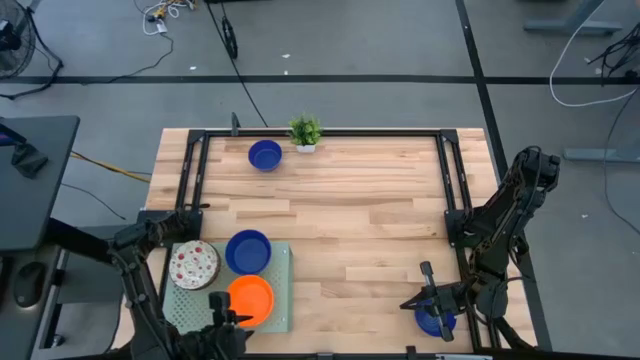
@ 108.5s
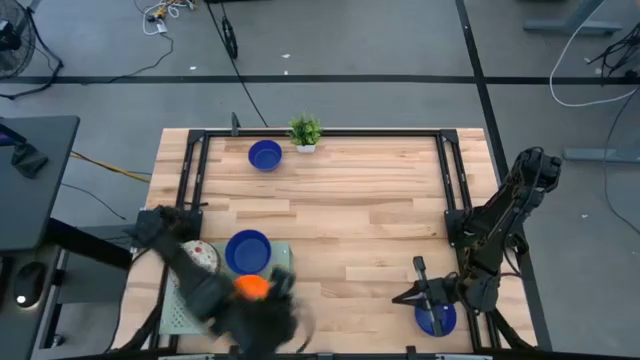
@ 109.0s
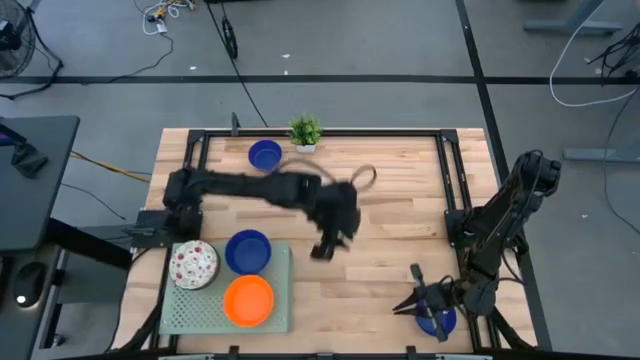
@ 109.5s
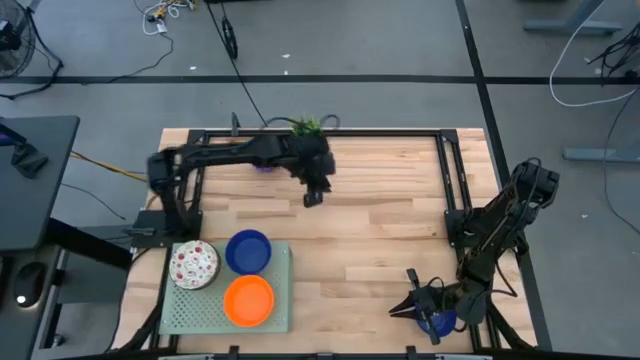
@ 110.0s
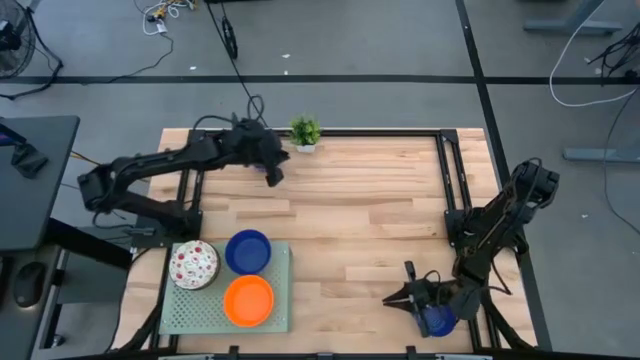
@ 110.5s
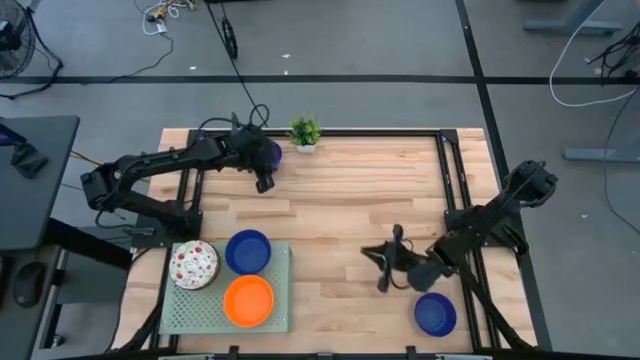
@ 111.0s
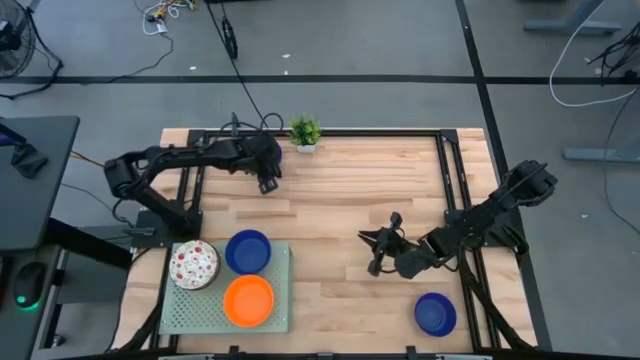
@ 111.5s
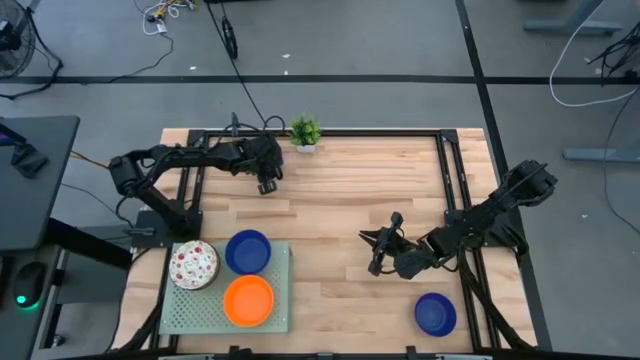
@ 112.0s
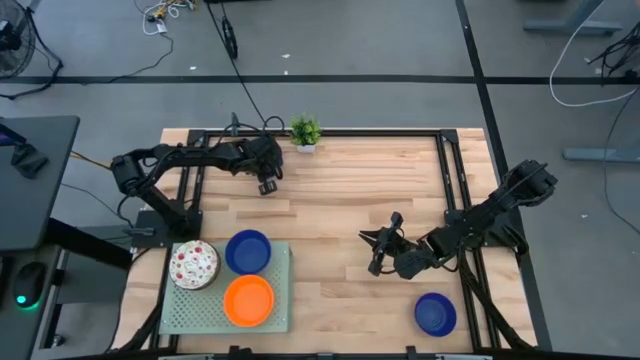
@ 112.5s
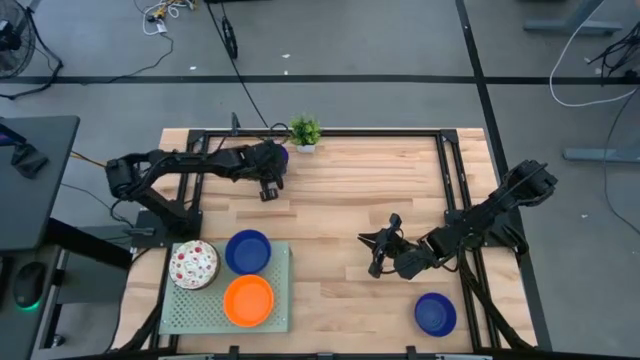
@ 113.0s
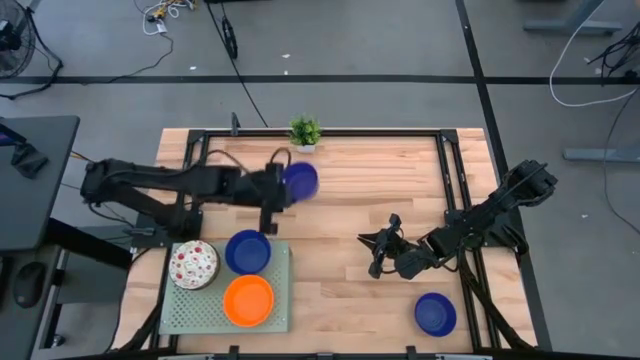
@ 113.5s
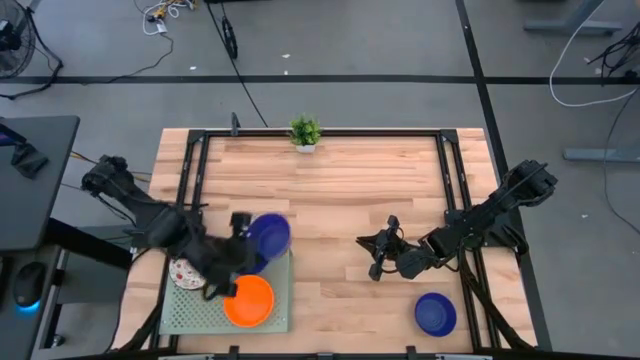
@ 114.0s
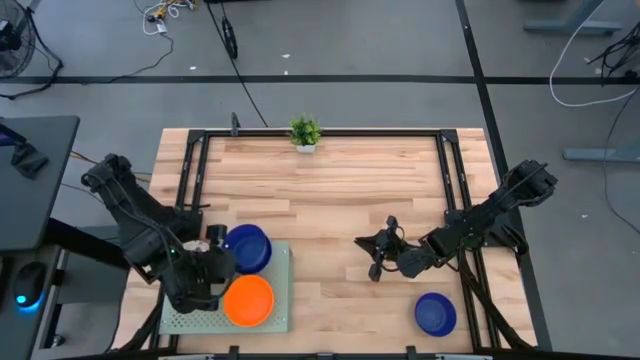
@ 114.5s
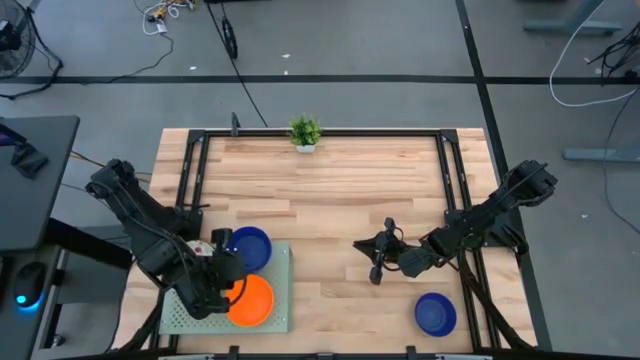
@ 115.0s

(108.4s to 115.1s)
Task: Pick & Place Mini bowls
Stack the blue bowl on top of the blue bowl on the shelf

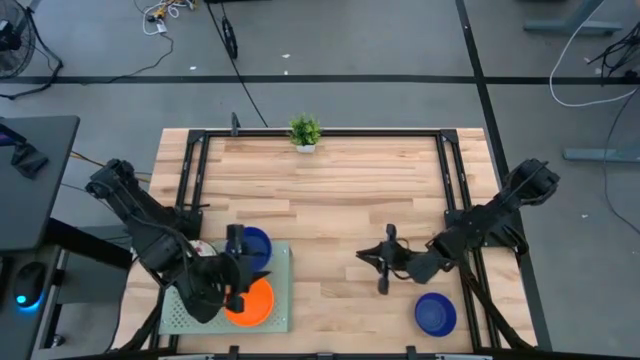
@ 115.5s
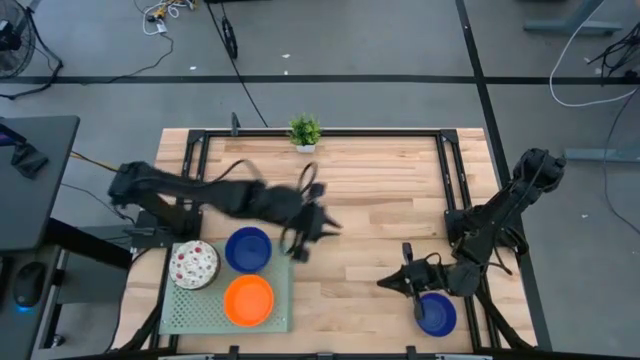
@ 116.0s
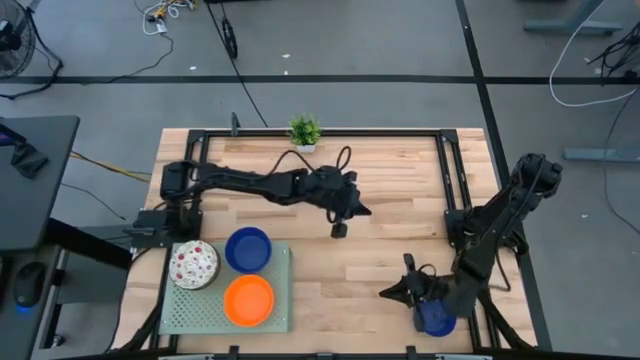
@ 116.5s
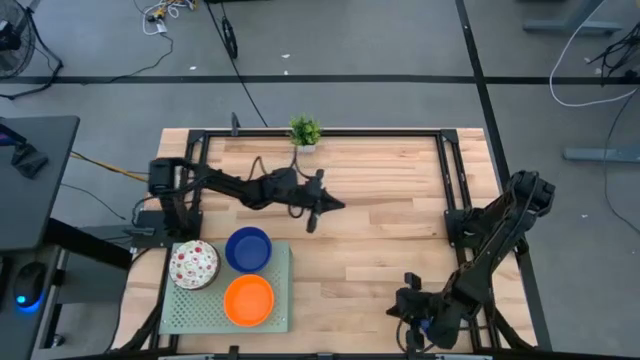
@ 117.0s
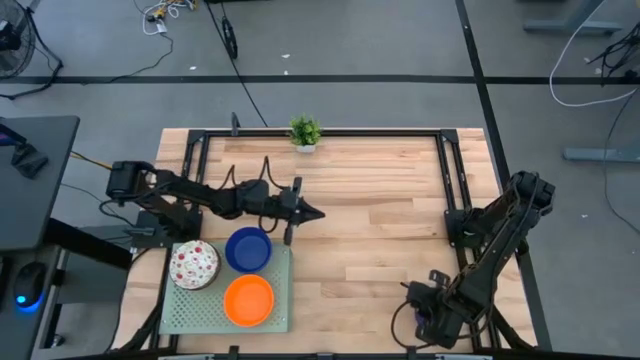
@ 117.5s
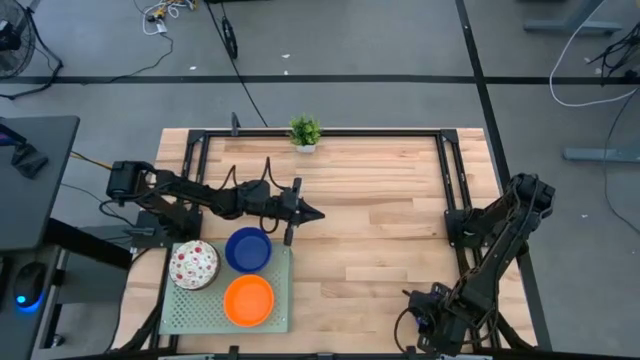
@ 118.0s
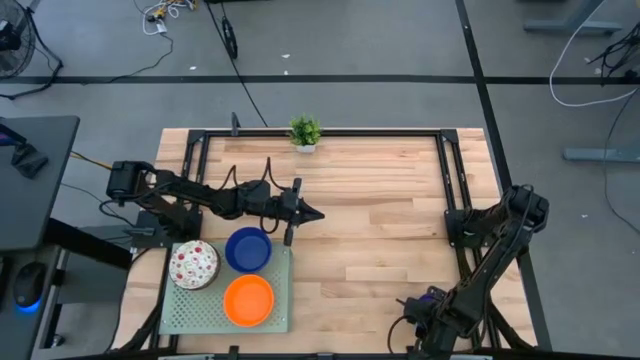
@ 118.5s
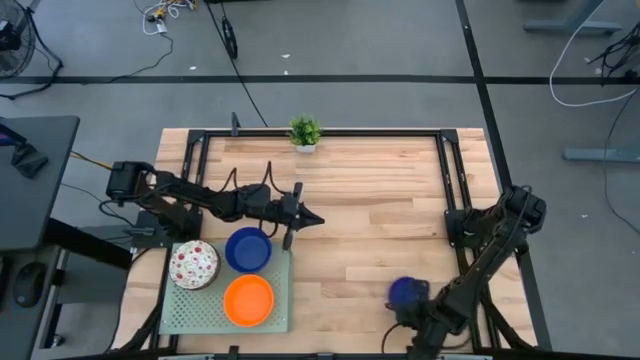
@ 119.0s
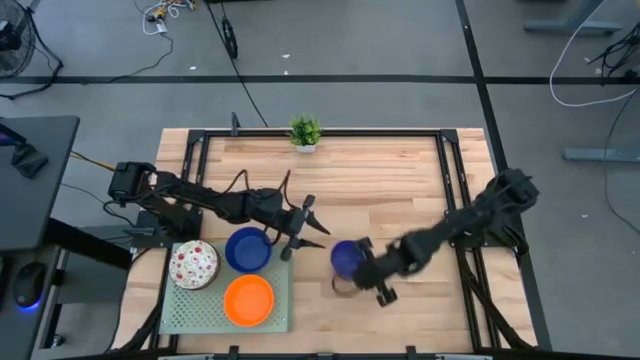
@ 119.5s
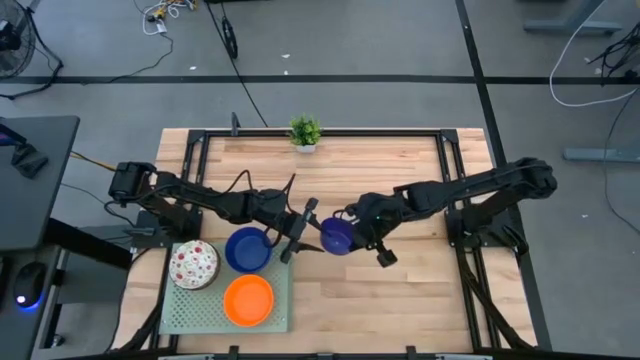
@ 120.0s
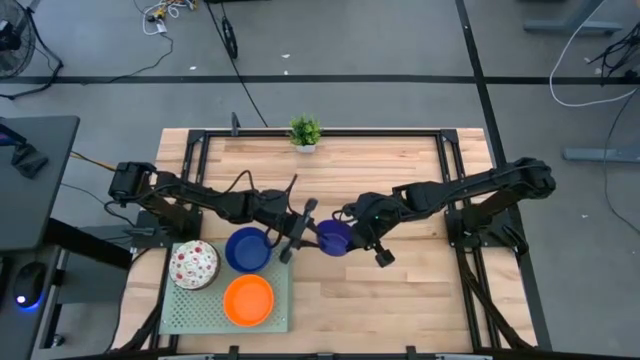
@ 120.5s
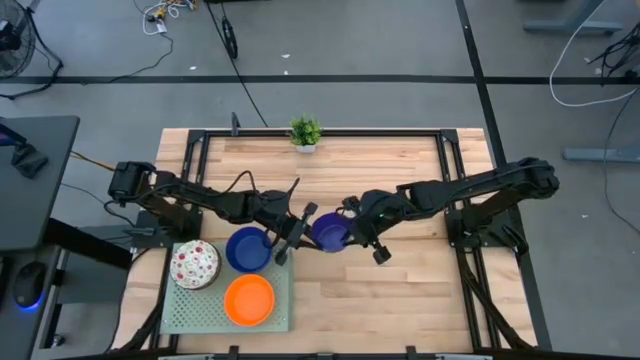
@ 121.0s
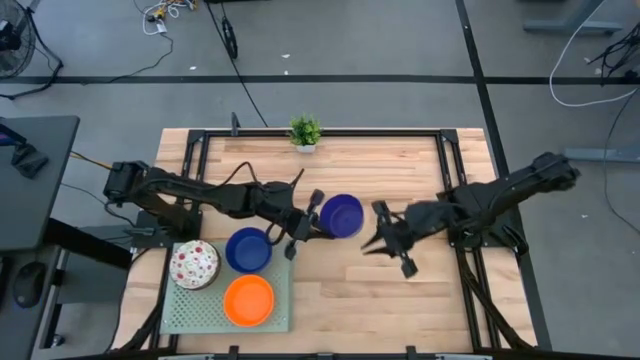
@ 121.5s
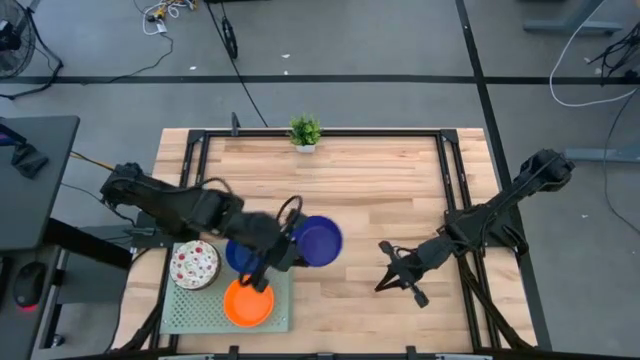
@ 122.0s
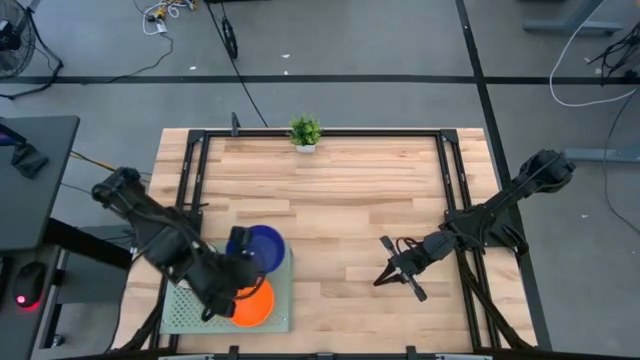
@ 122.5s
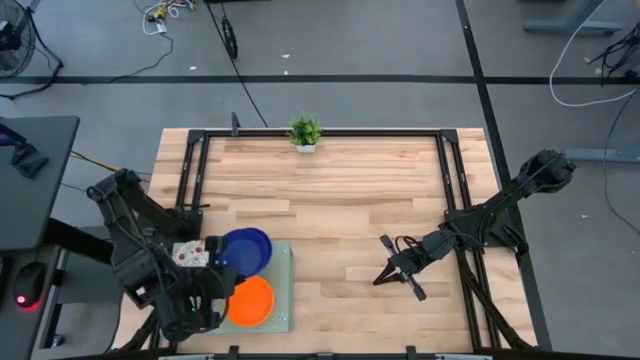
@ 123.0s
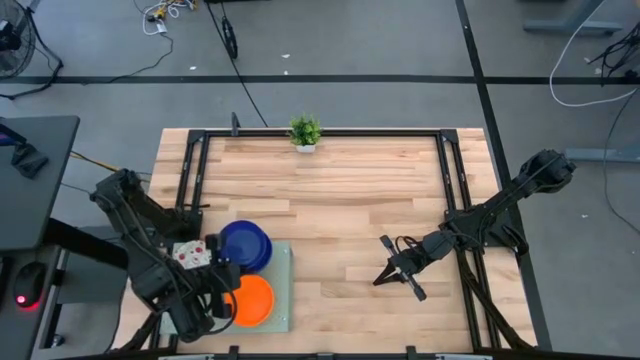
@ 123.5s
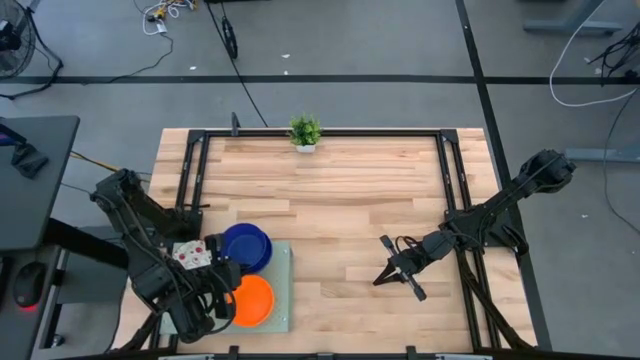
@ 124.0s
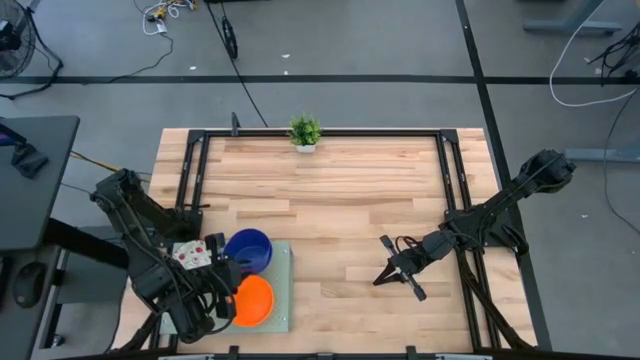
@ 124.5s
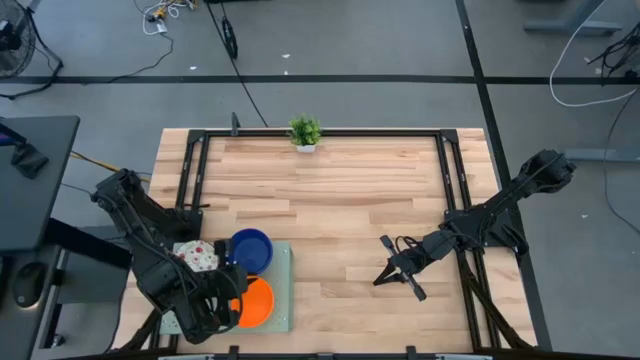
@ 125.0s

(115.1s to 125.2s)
Stack the blue bowl on top of the stacked blue bowl on the shelf

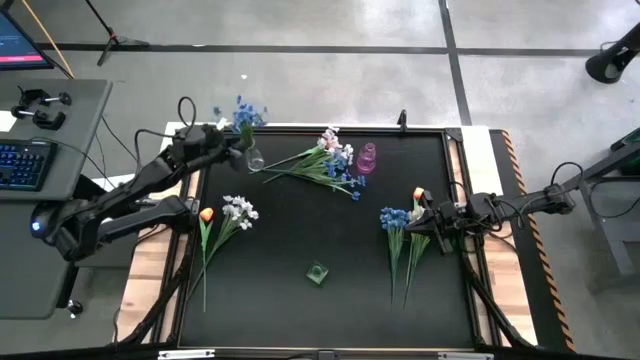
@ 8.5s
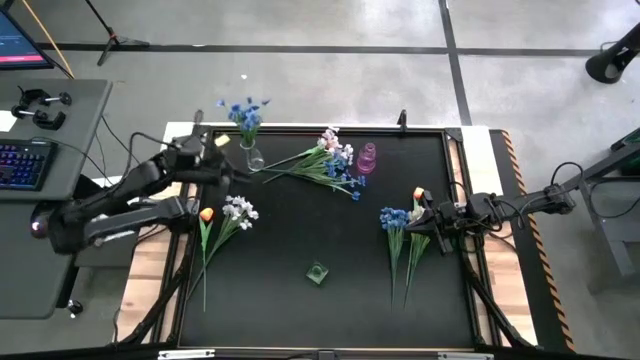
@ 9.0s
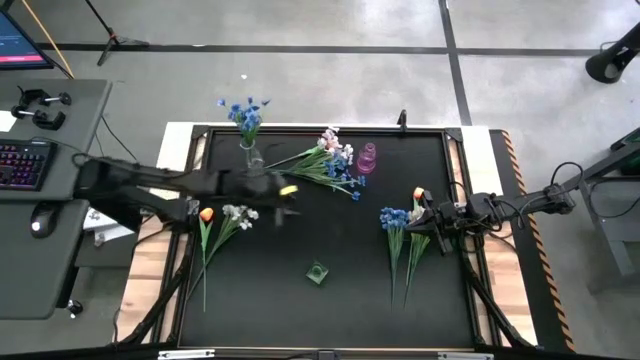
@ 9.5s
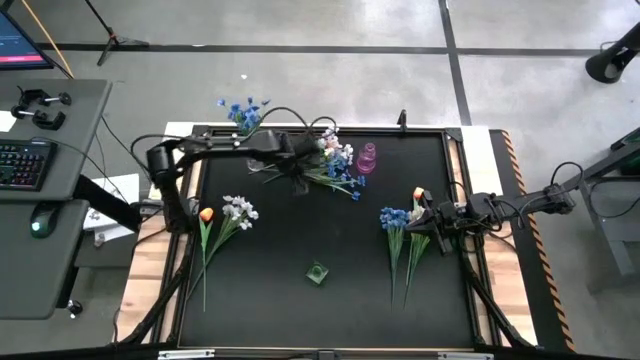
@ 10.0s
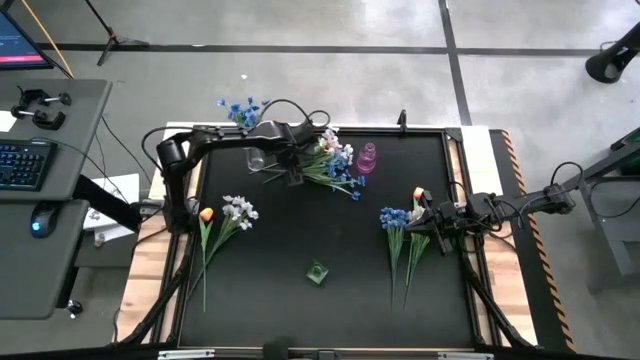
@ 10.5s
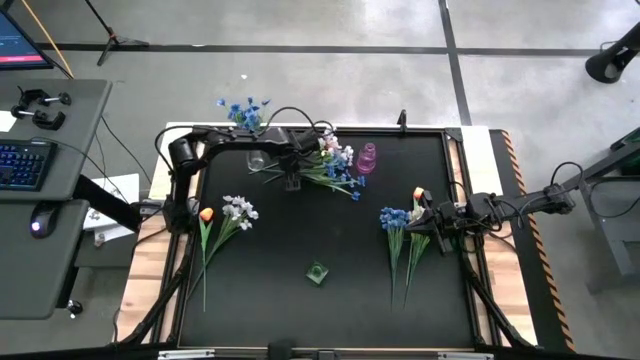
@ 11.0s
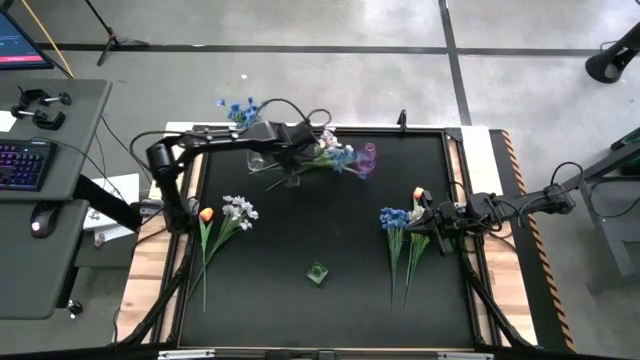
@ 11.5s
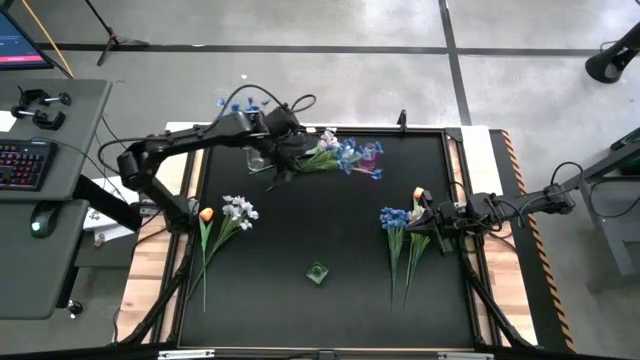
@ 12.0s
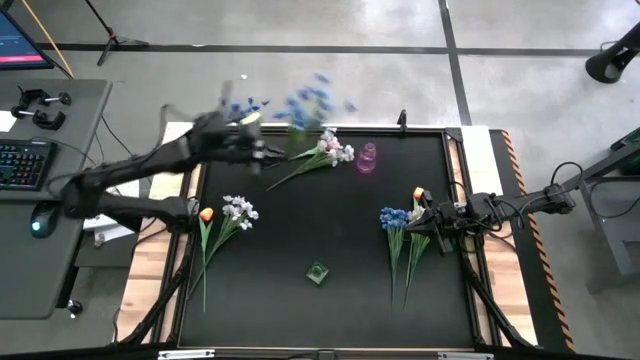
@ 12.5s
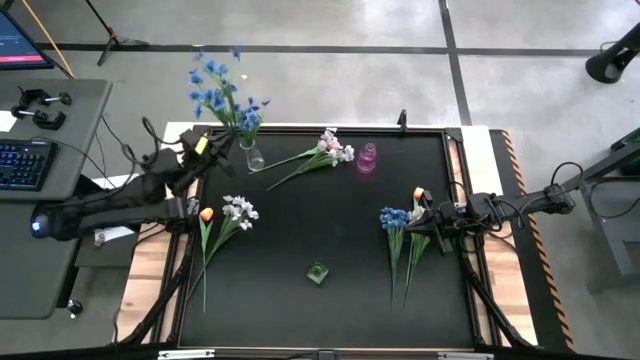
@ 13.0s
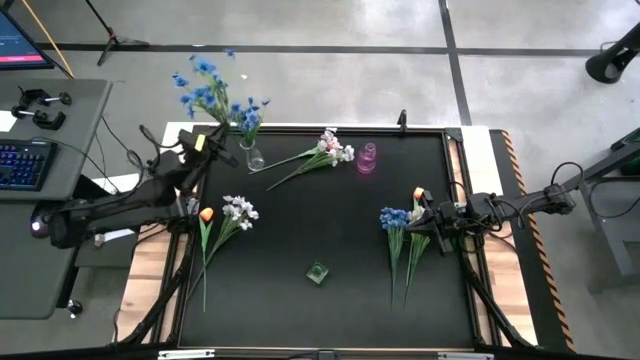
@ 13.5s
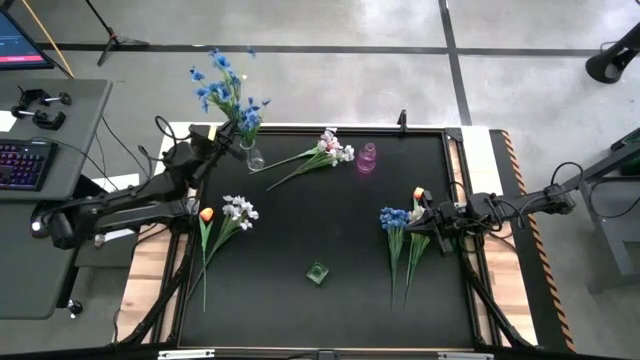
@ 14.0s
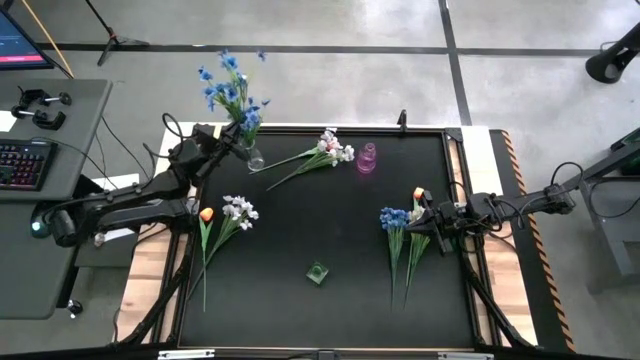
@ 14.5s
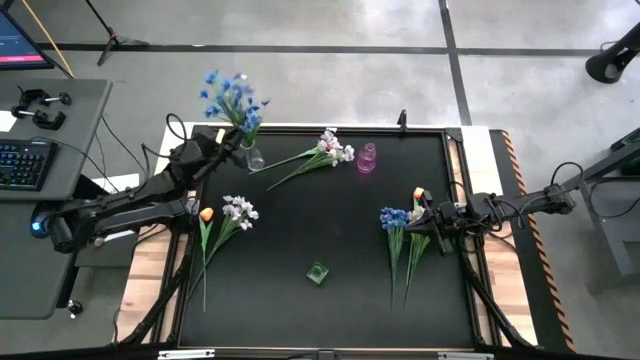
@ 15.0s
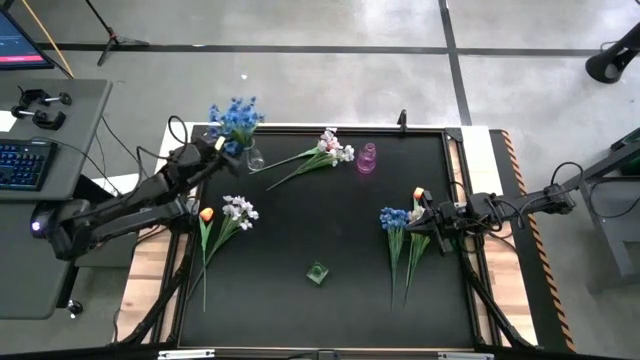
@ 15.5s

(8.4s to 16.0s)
Task: Sort flowers into vase by color
Put the top blue flowers into the transparent vase
